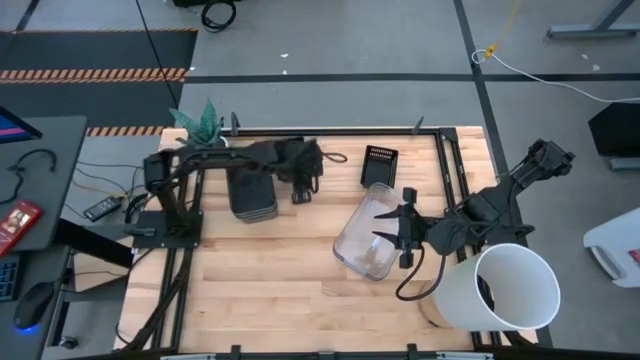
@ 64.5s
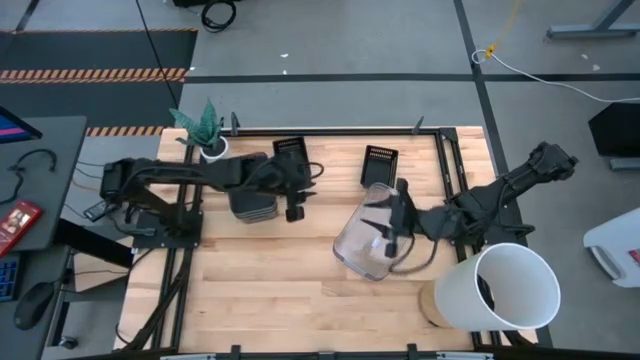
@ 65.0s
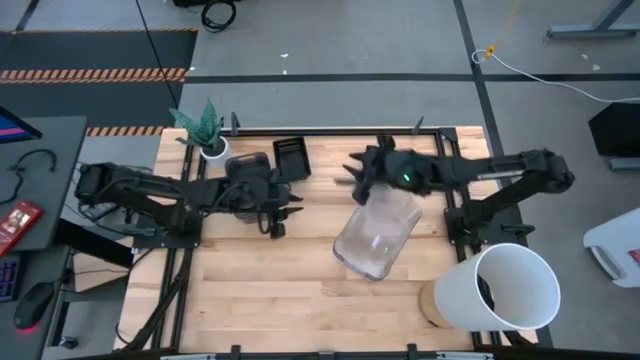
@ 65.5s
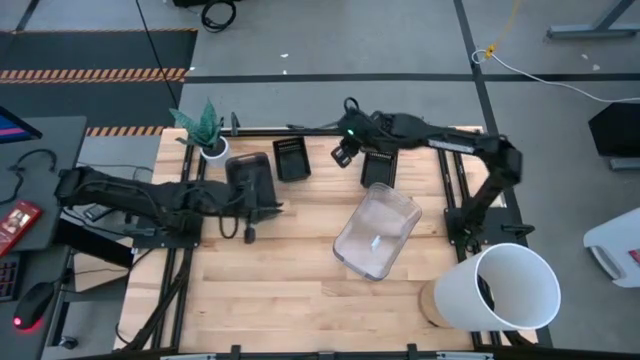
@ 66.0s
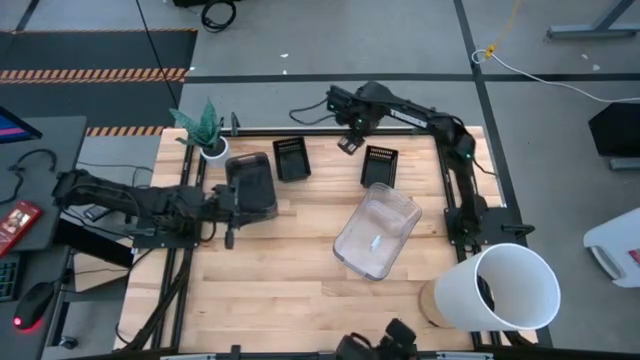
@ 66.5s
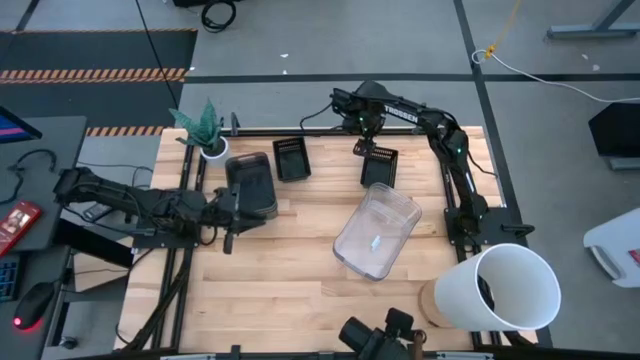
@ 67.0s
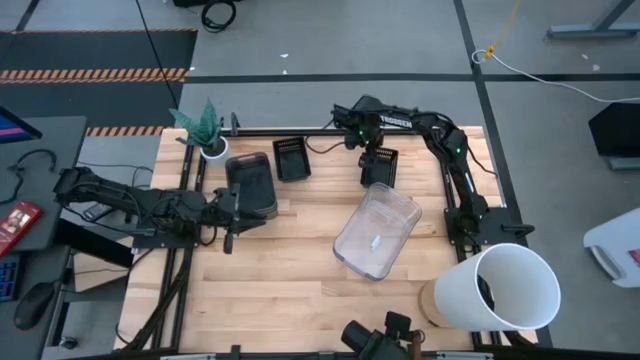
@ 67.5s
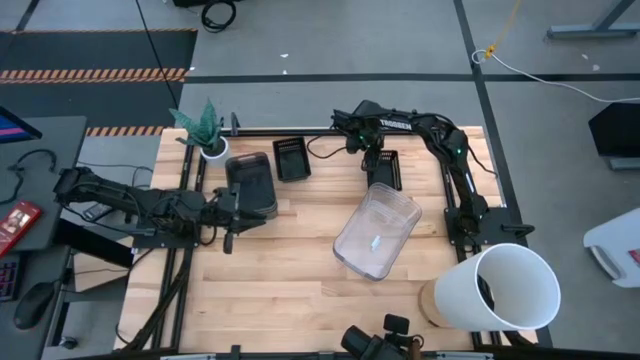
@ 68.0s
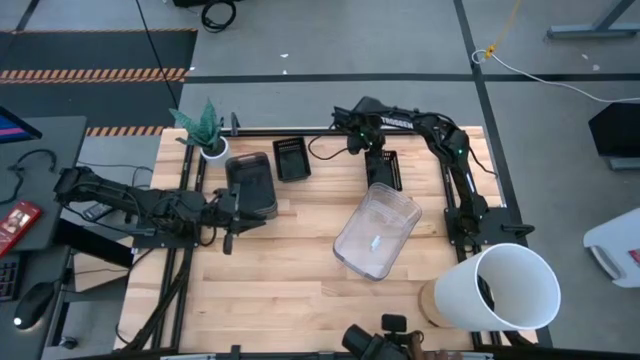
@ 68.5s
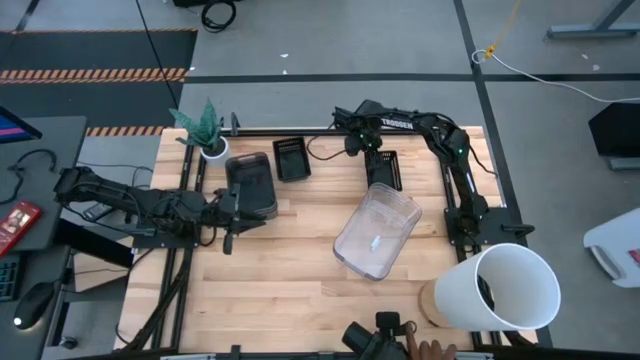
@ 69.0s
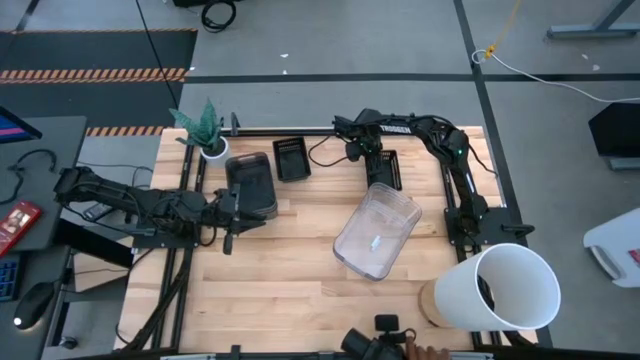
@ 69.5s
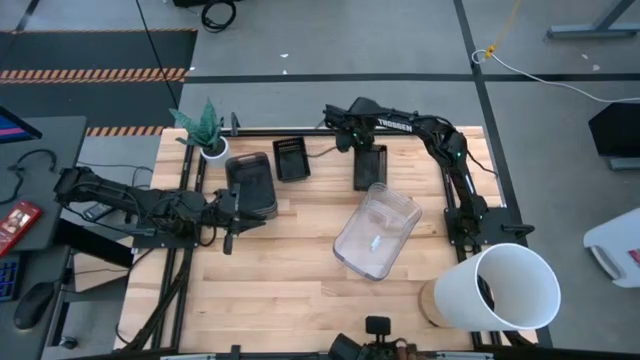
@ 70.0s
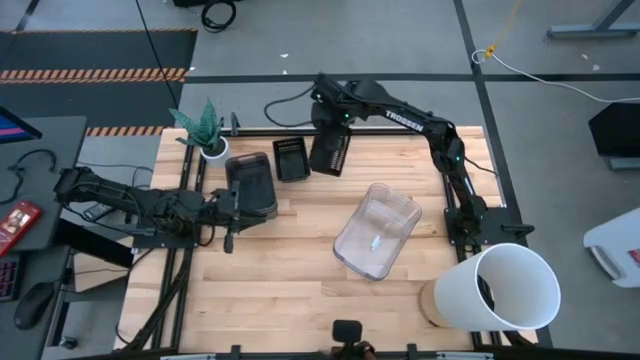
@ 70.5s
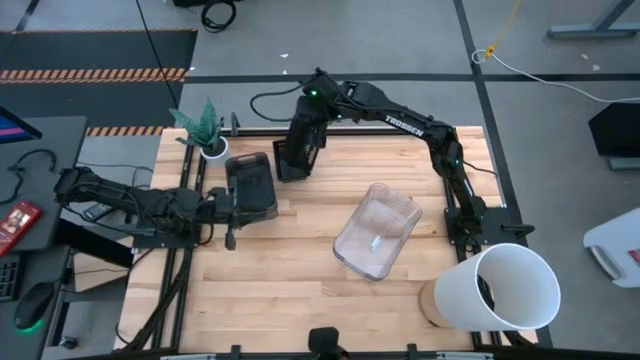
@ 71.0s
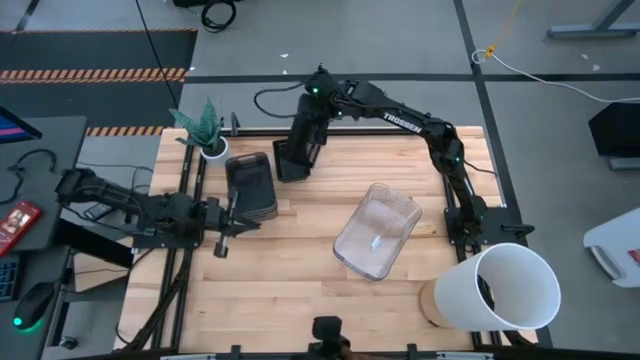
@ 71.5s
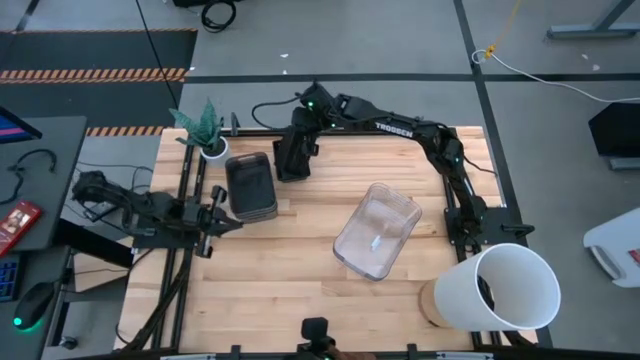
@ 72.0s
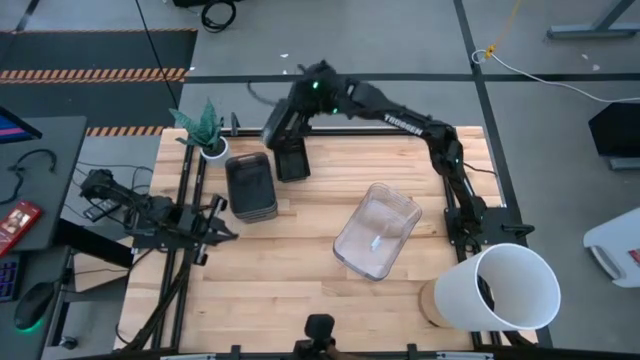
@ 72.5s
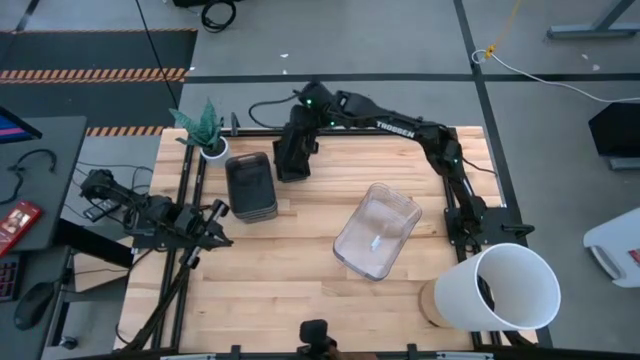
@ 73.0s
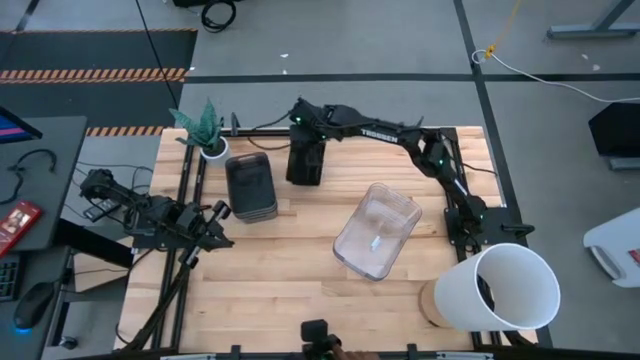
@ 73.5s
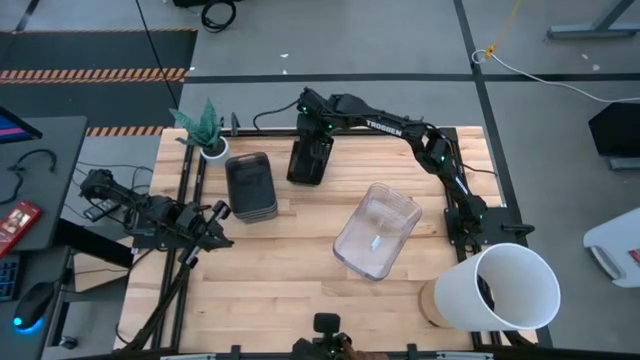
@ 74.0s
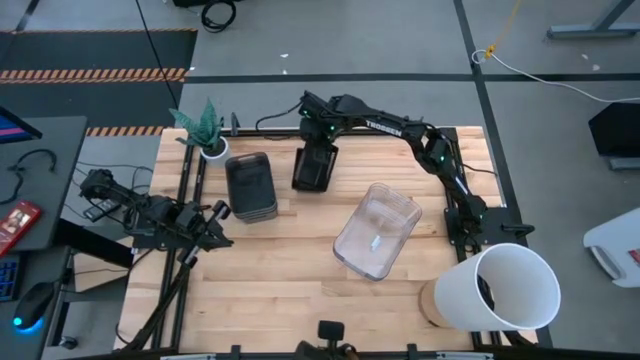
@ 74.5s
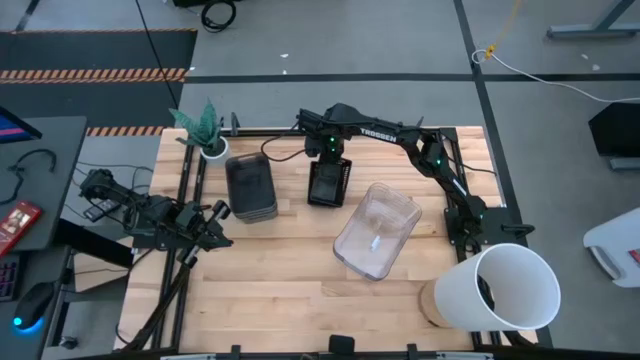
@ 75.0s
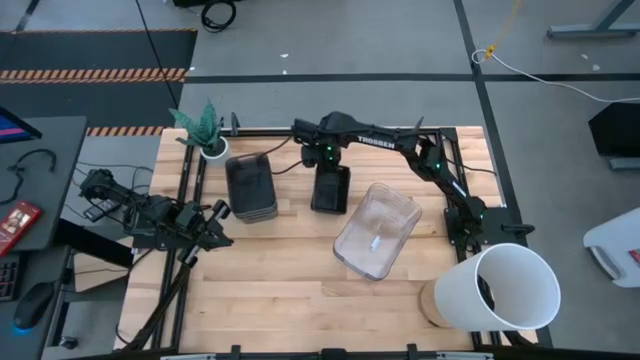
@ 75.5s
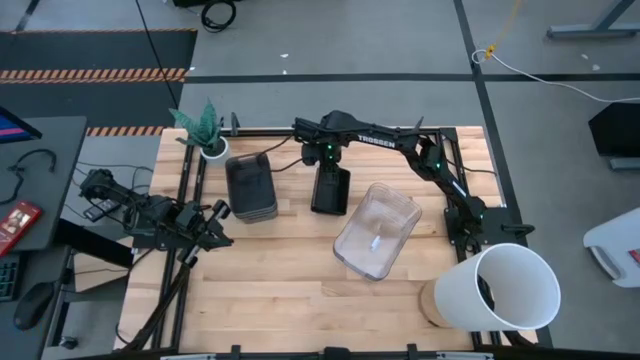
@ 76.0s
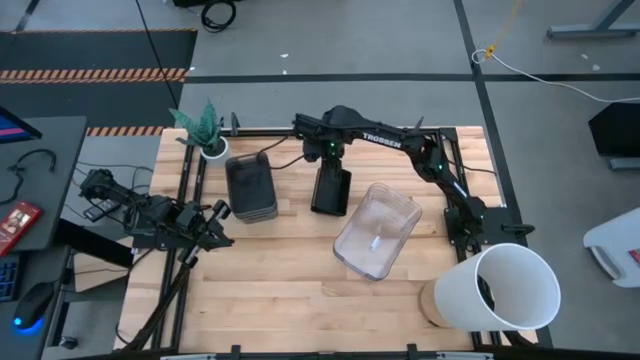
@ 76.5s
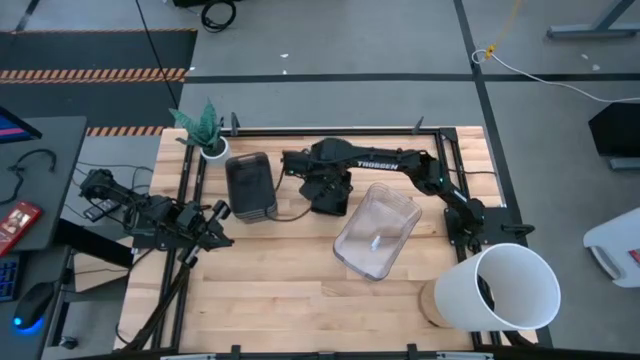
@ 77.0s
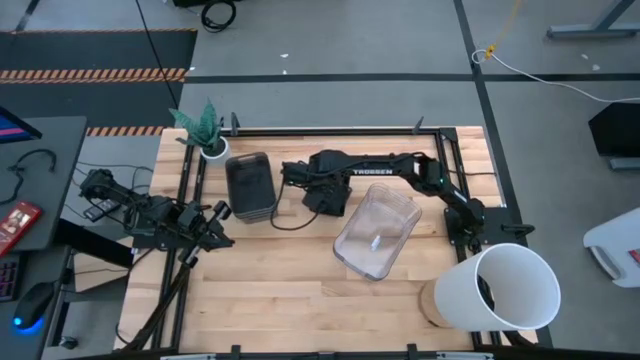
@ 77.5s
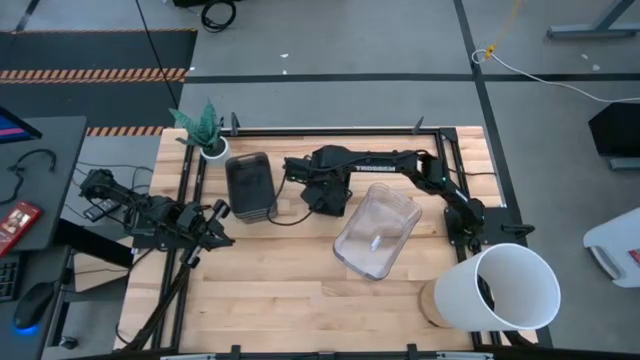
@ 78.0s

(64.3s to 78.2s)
Stack the right black bin on the left stacked black bins

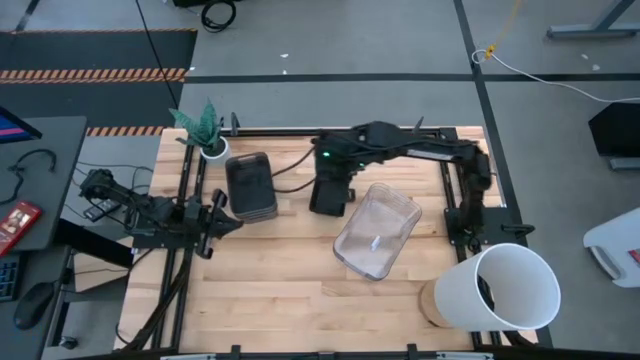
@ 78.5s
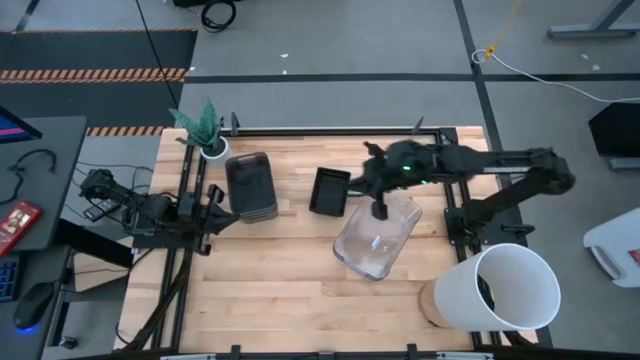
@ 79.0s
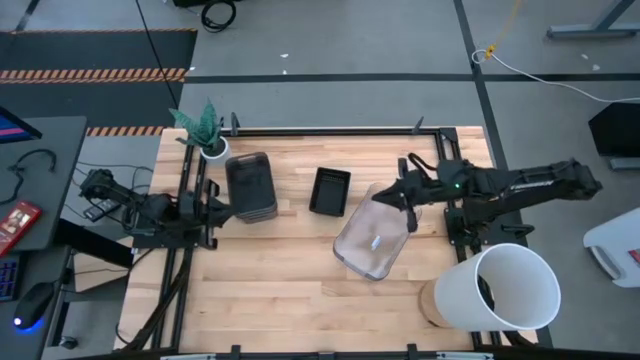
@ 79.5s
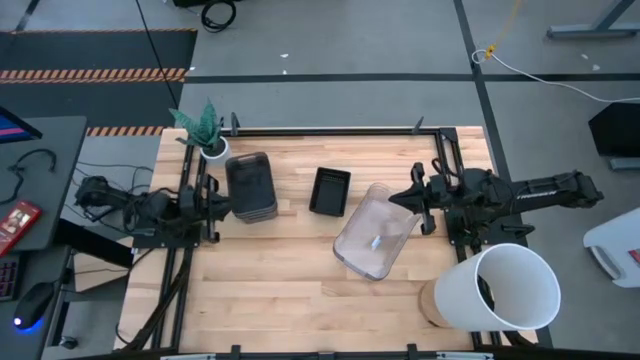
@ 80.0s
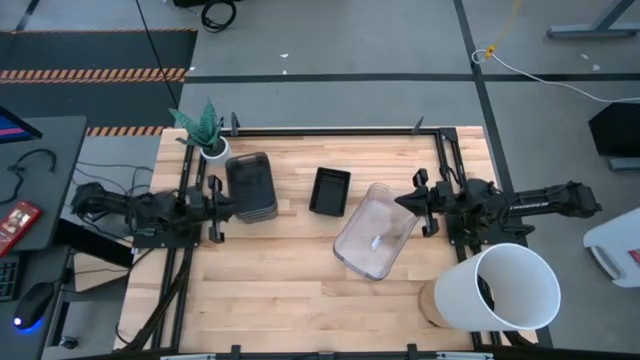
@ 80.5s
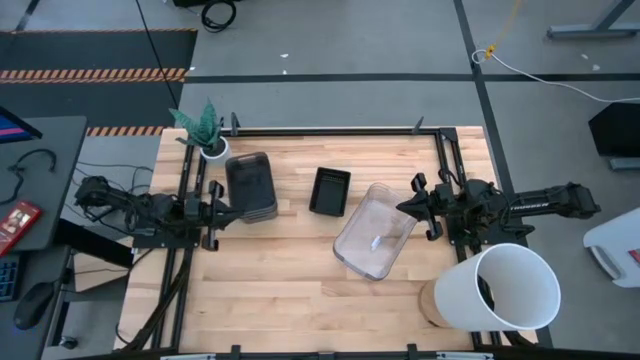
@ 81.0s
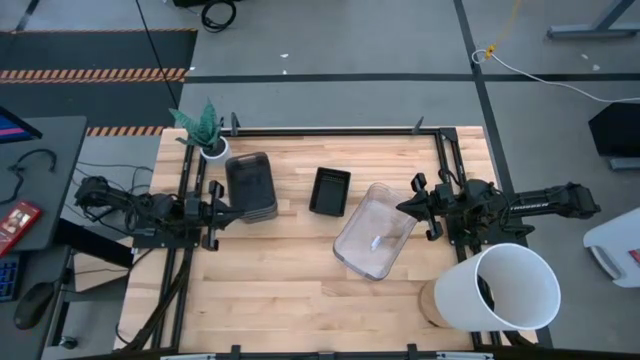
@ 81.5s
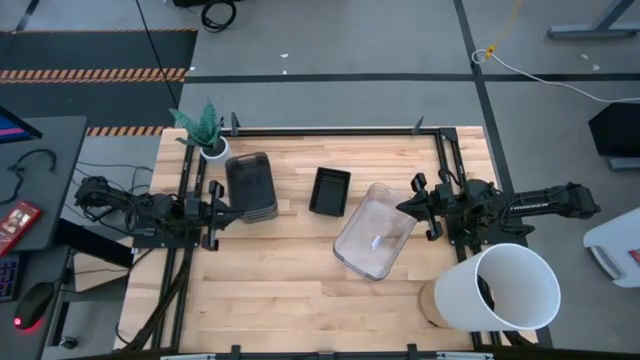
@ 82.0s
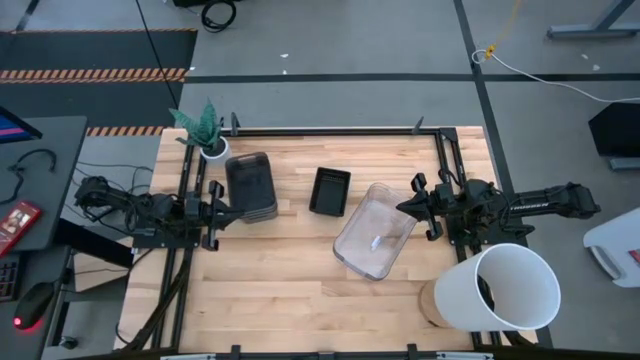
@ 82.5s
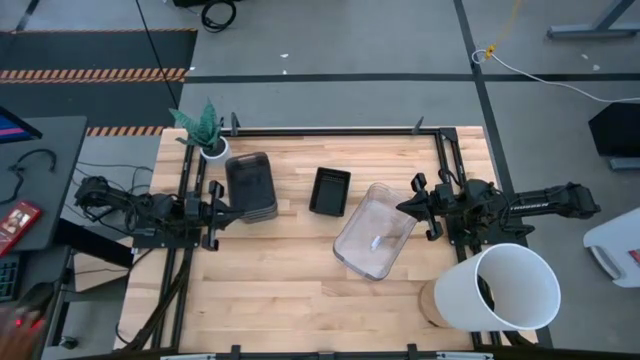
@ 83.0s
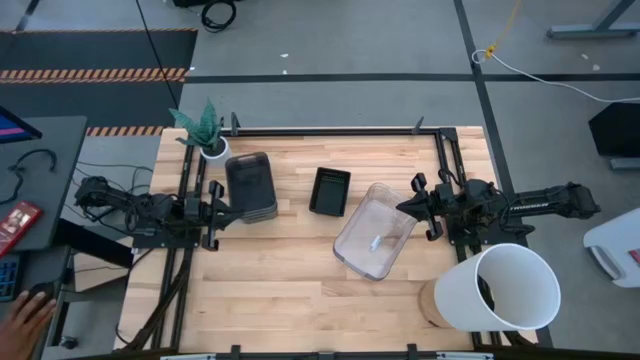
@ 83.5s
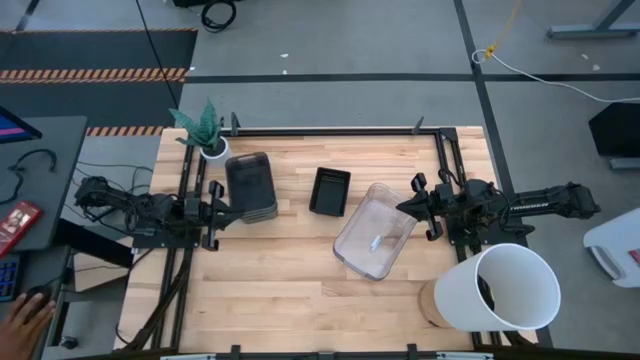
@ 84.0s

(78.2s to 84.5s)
Return to Home Position
